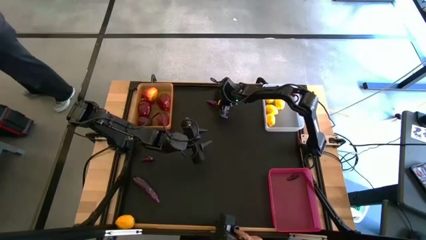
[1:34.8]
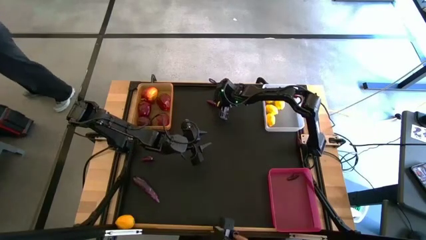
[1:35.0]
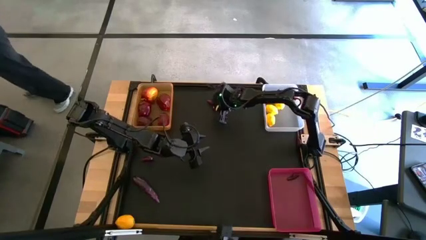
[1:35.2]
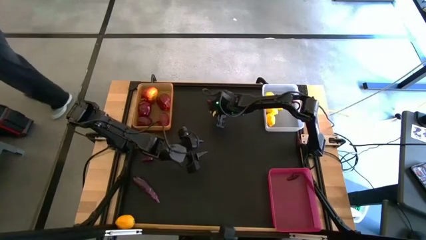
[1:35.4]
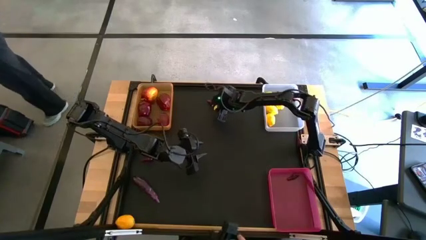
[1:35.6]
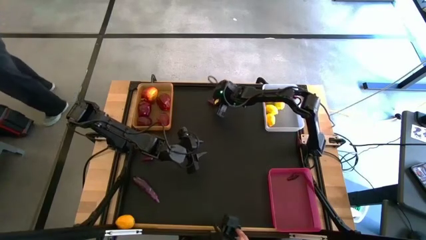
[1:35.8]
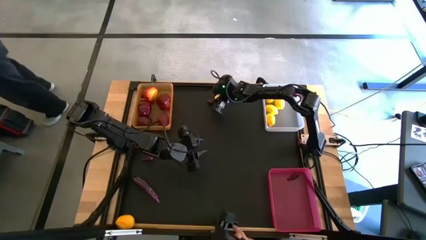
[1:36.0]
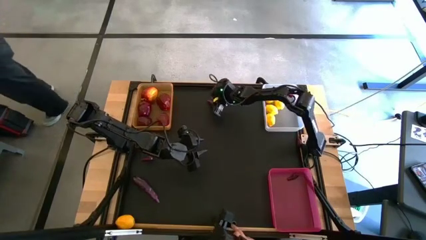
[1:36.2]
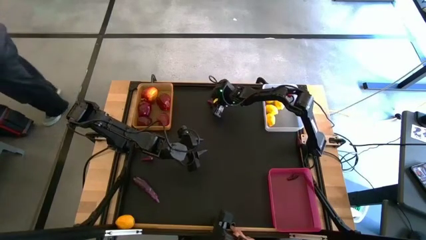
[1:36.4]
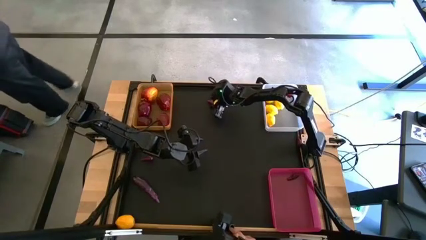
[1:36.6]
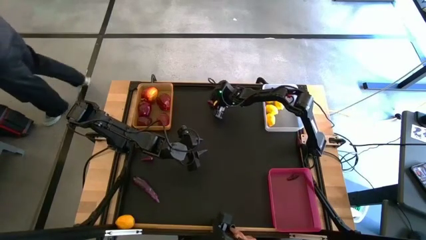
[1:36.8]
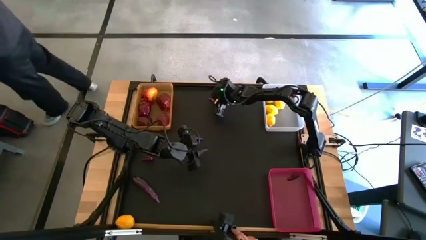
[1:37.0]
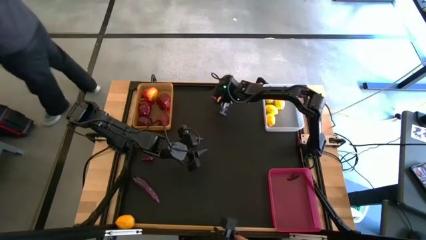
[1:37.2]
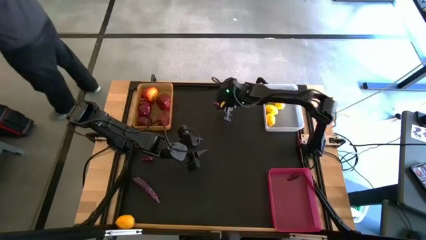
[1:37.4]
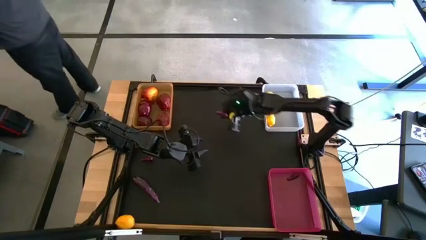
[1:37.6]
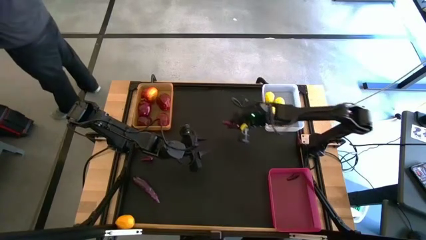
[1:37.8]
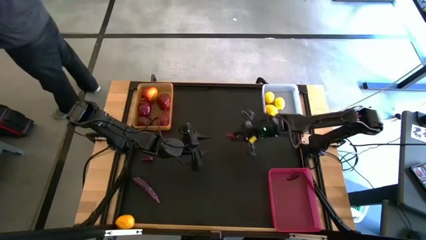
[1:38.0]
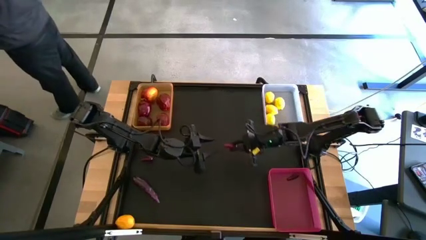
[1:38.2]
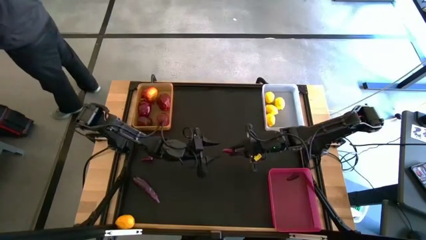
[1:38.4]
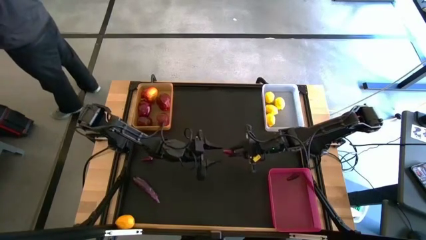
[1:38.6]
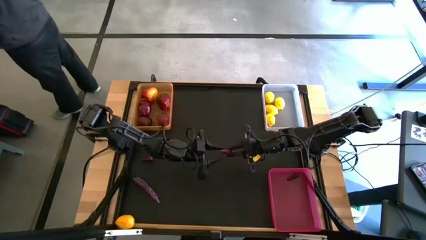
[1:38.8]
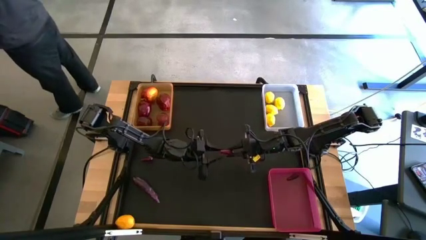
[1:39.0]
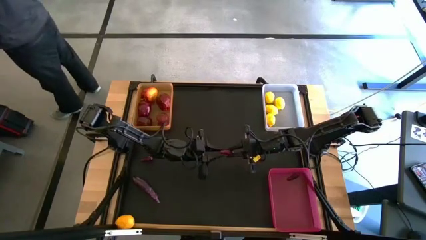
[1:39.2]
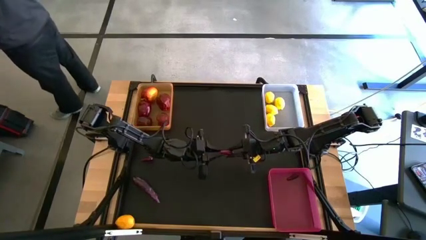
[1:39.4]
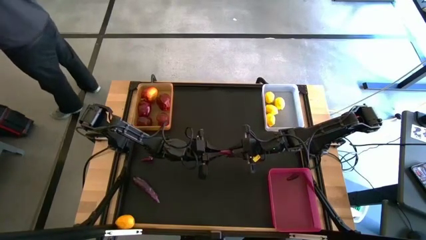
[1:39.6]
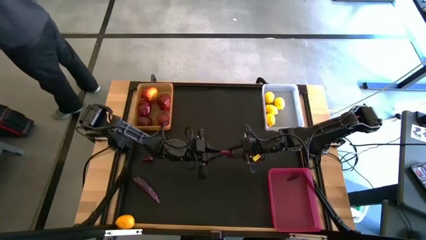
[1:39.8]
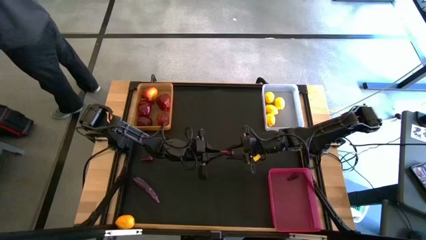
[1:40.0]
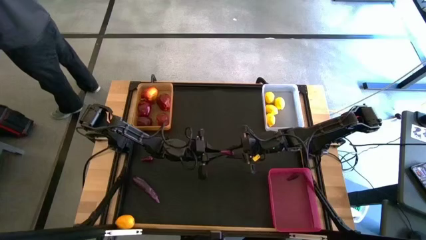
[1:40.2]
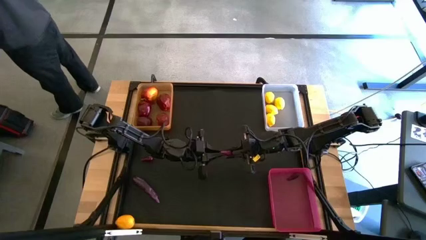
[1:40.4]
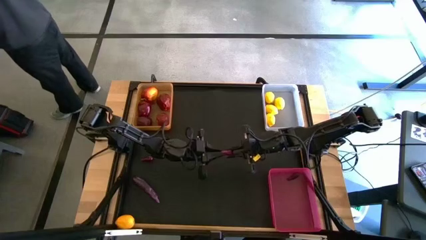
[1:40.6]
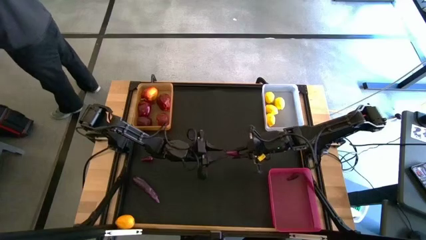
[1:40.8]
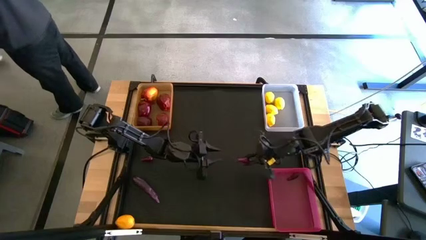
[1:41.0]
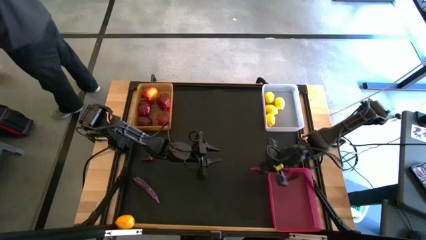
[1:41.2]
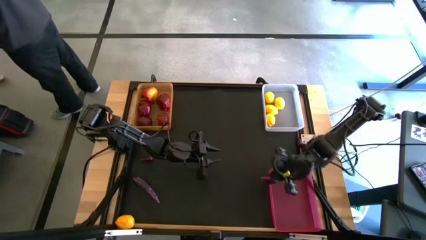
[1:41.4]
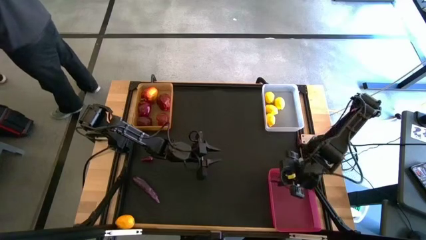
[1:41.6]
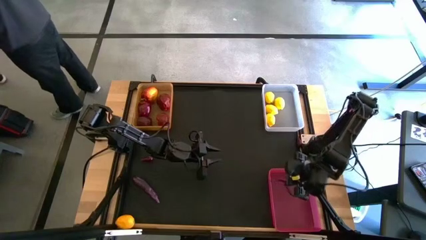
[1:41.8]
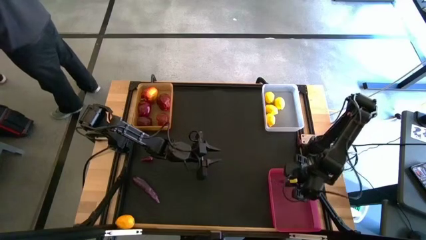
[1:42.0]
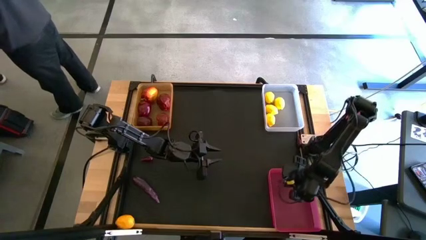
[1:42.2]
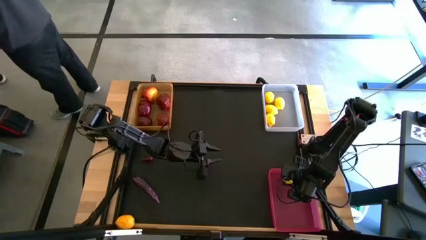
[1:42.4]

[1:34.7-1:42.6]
Task: Sort produce into baskets
Put the eggplant into the red bin

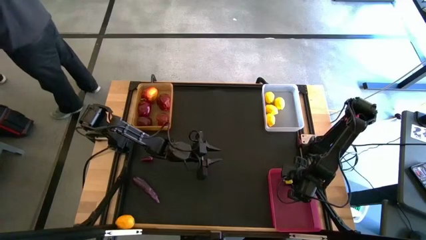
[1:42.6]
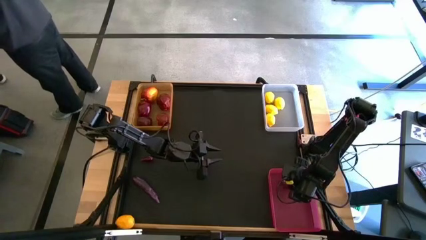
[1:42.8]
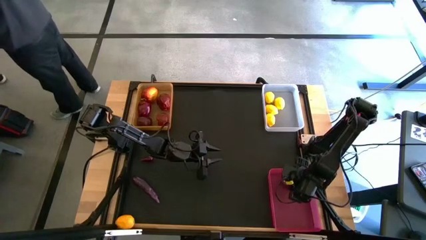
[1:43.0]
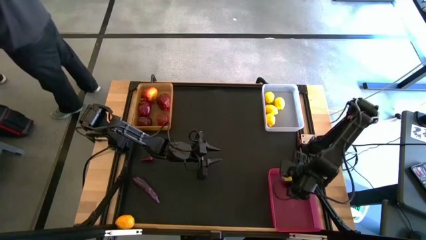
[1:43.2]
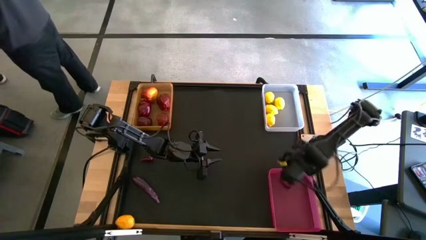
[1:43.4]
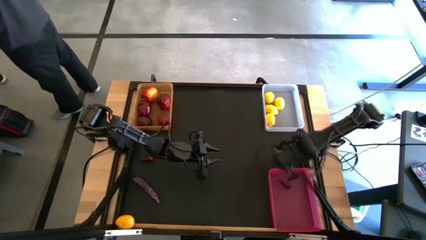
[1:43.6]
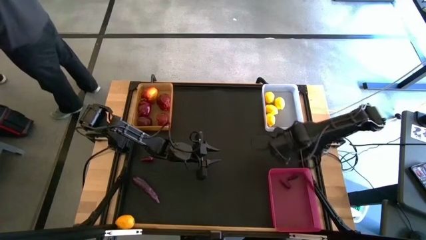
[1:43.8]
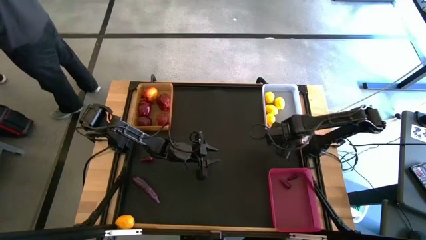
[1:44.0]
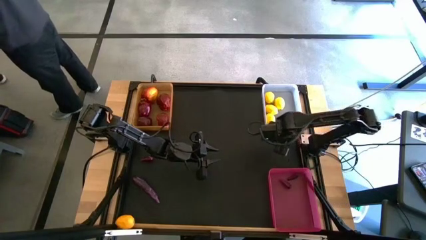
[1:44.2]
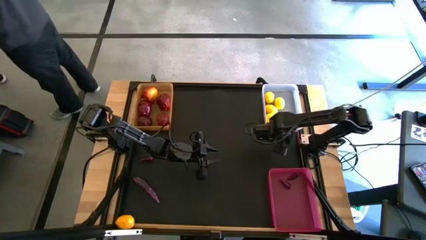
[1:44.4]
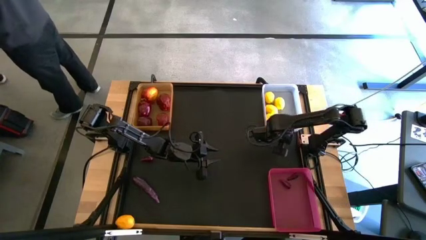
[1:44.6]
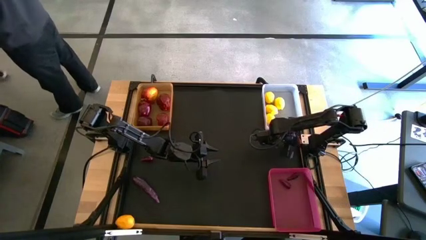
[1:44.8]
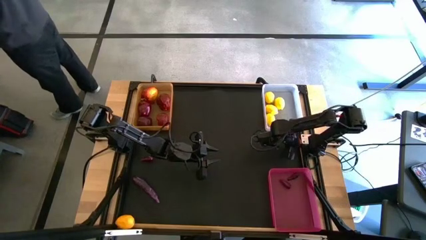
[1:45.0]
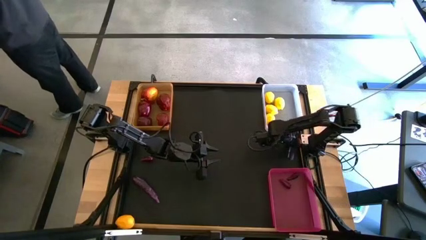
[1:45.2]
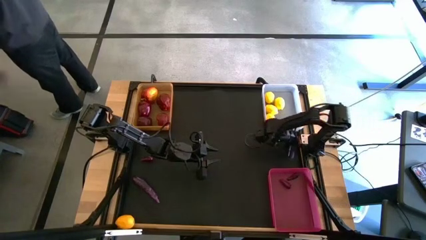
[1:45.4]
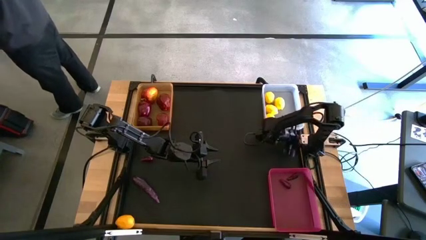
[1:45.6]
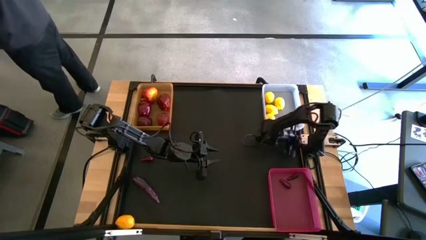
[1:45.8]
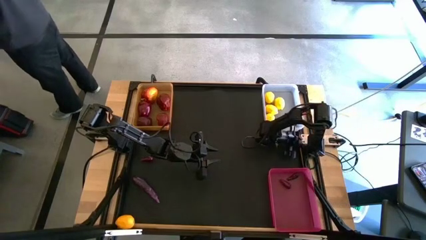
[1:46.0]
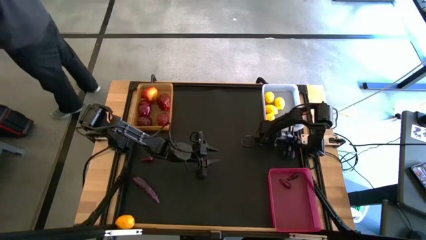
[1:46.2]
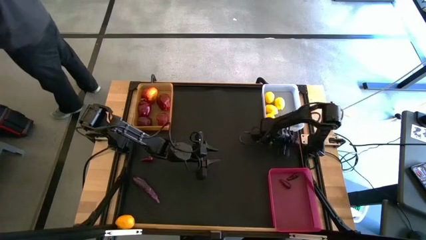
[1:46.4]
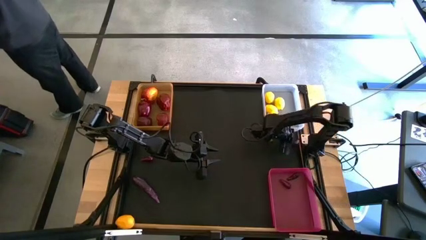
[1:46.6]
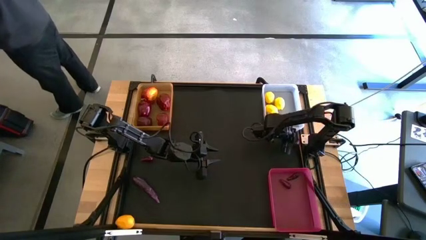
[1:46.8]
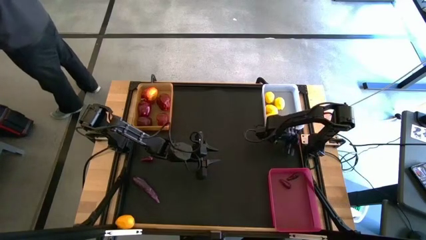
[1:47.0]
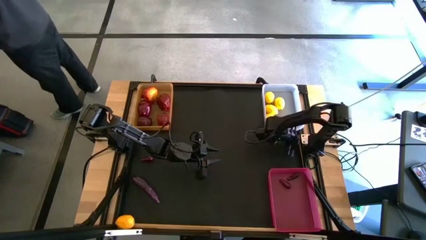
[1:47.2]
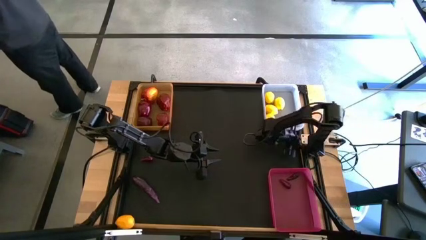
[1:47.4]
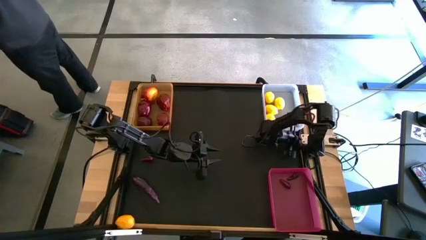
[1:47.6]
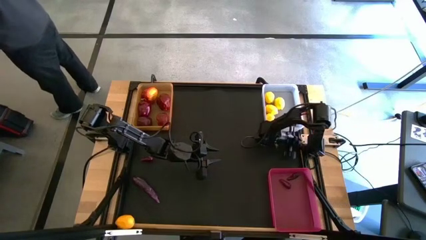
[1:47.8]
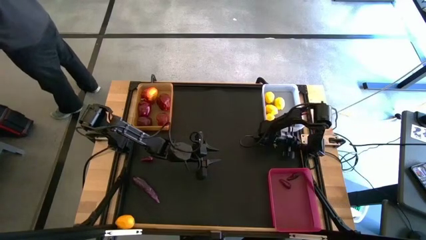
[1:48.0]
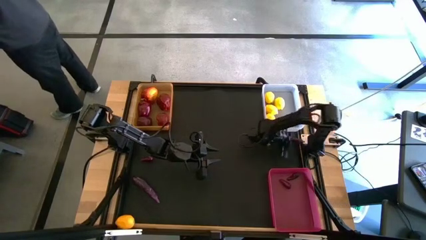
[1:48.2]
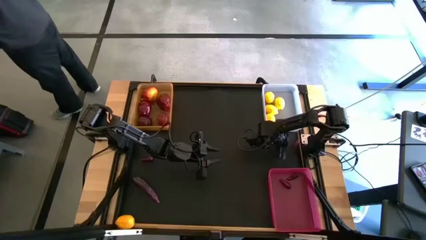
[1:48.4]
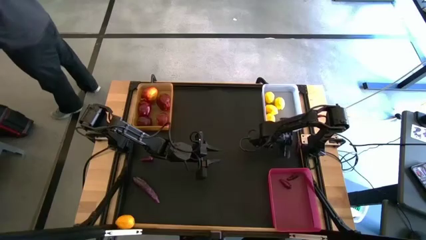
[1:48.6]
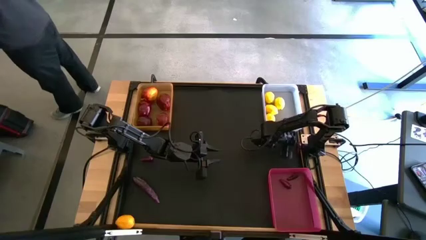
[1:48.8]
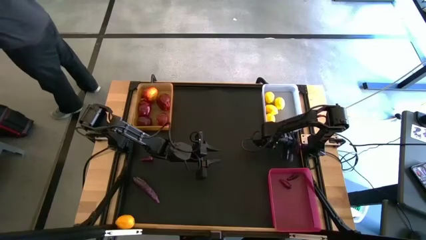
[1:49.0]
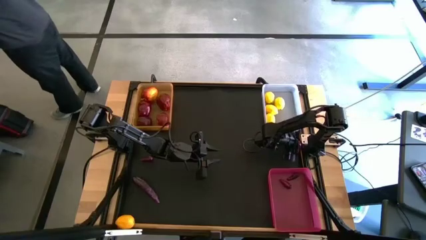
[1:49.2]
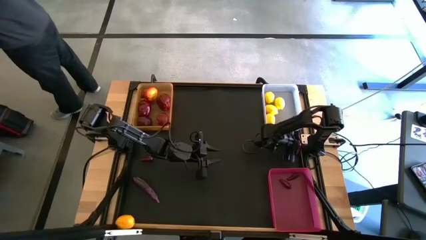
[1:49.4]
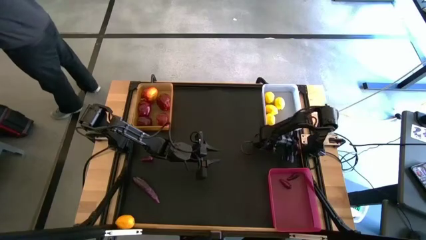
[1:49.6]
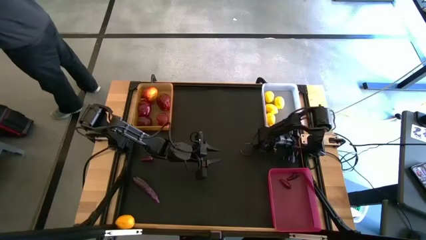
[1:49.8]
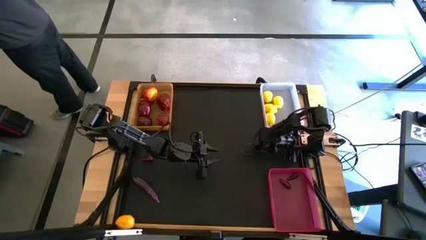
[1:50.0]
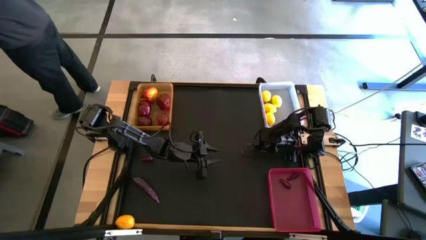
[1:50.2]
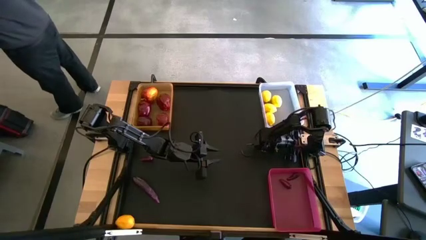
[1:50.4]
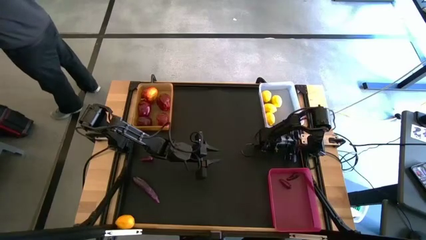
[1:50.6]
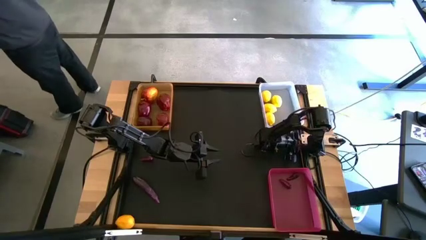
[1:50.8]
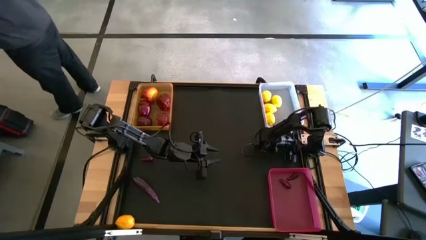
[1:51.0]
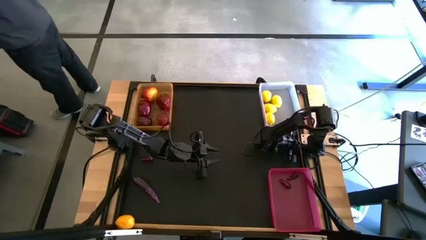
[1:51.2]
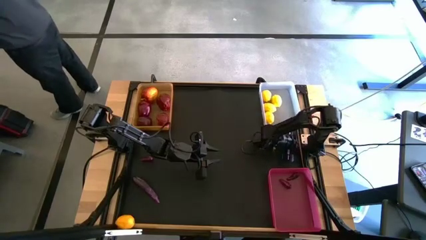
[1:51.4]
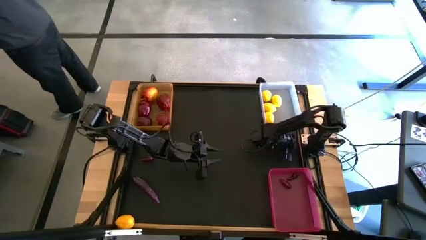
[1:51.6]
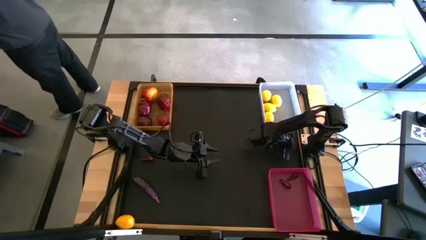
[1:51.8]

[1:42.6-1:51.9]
Put the eggplant into the red bin
